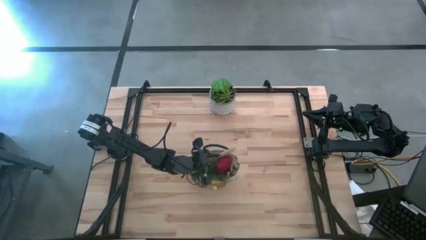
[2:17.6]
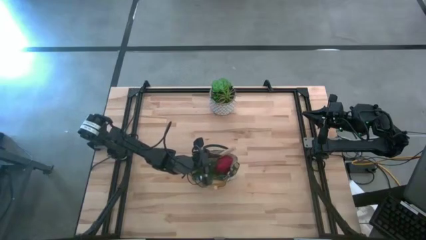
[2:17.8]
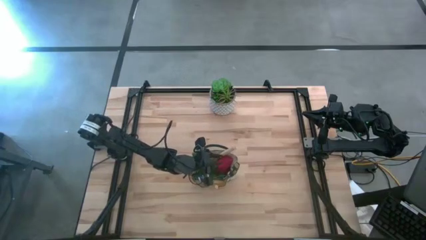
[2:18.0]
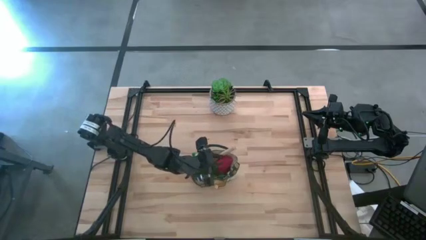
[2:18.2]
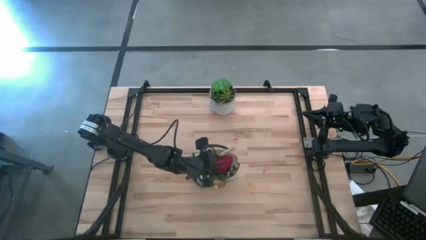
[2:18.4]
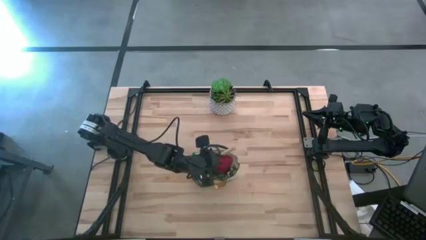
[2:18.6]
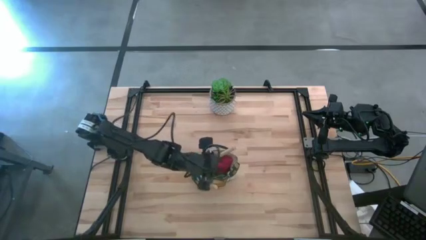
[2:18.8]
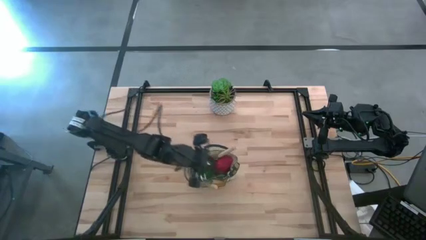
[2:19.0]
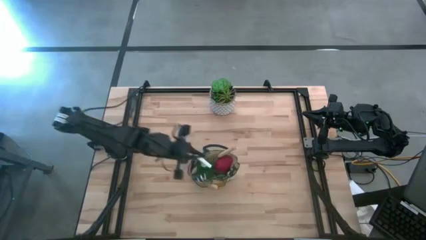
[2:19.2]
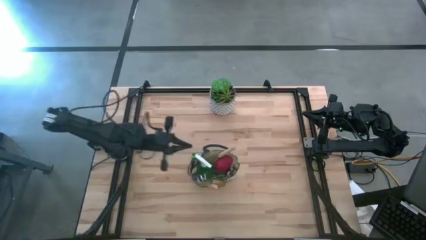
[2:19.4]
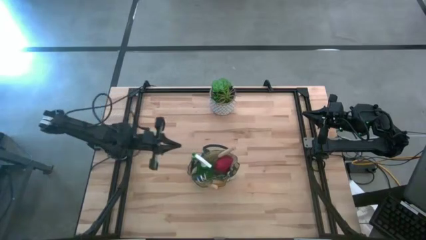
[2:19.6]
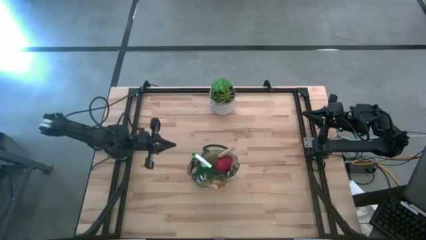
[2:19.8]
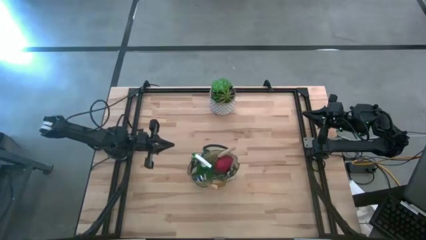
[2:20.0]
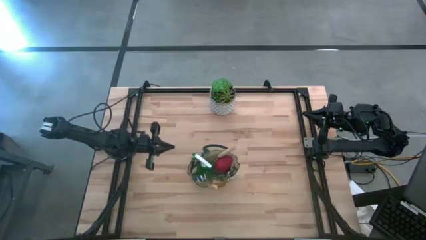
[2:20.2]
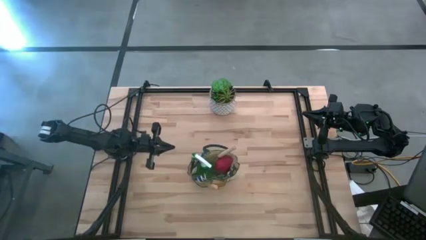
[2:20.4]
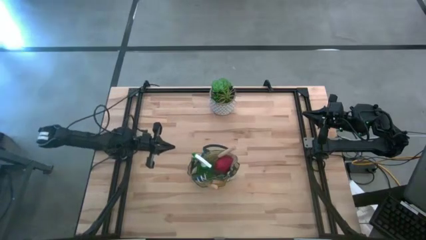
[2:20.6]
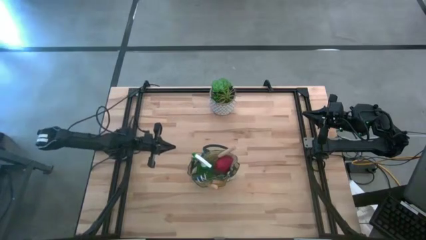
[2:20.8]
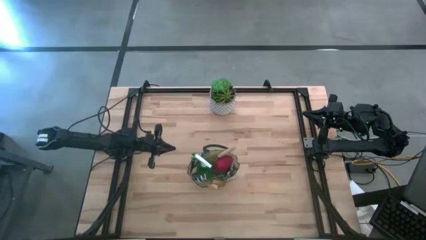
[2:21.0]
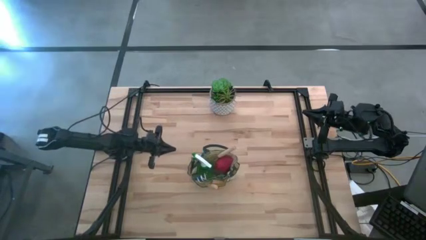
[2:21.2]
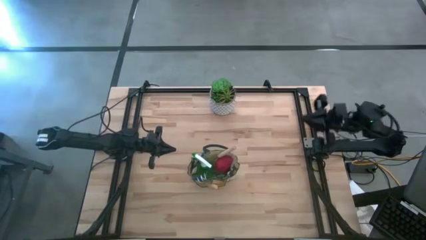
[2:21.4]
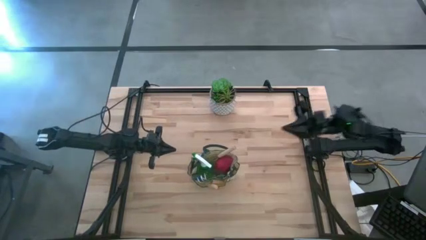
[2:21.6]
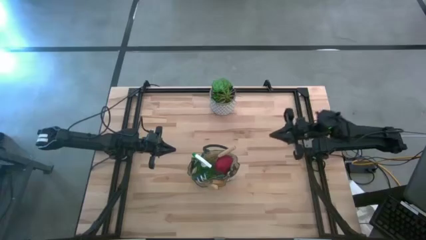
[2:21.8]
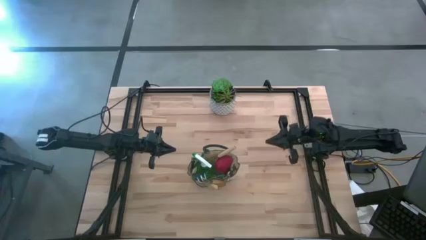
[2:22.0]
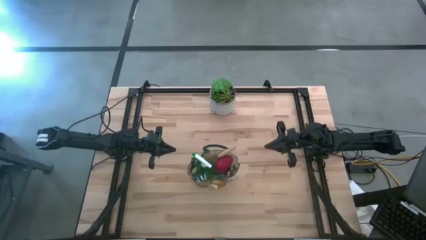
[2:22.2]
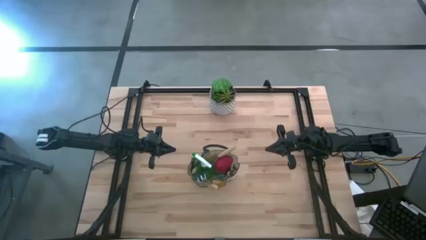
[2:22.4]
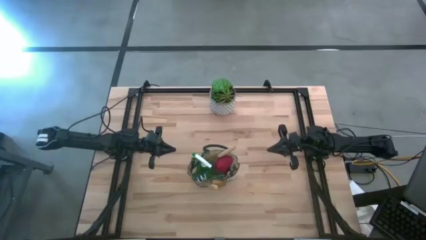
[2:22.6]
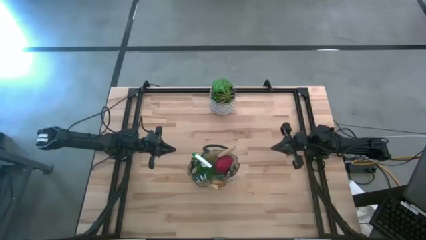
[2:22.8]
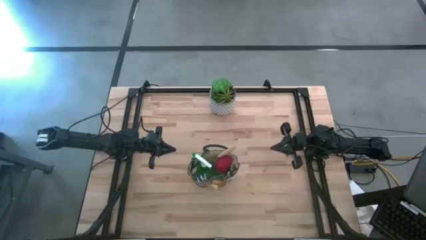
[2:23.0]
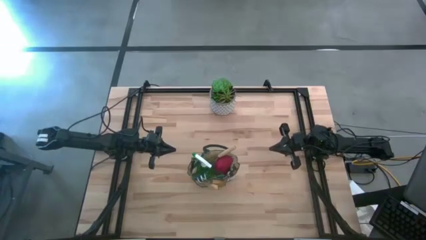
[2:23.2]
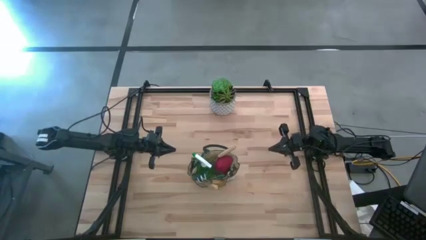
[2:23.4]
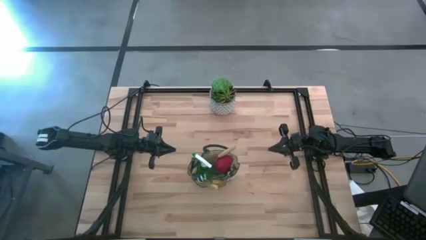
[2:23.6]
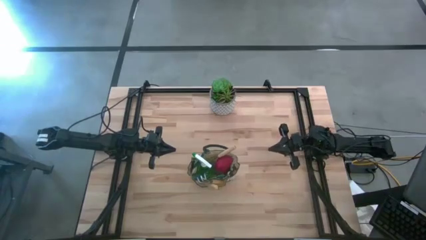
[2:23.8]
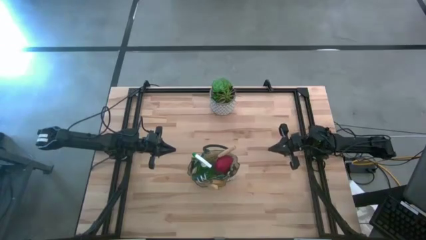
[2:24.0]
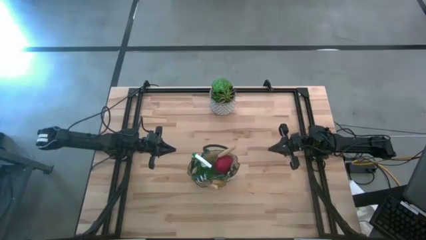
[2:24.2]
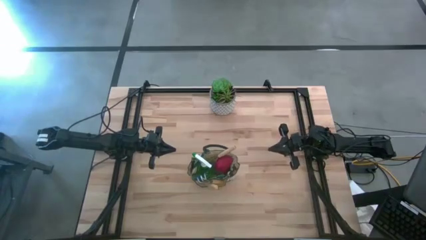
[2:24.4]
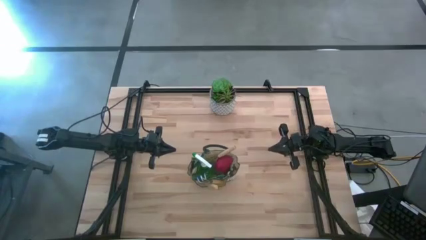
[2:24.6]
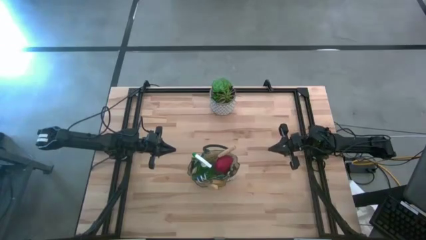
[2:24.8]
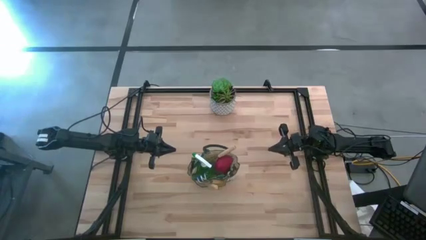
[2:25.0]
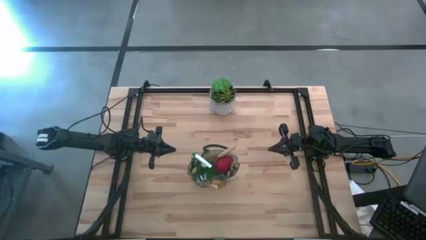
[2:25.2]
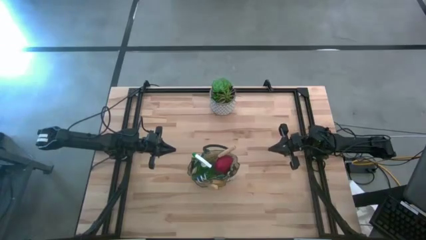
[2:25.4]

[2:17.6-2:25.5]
Task: Pick & Place Garden tools in Gardening bag
Return to Home Position

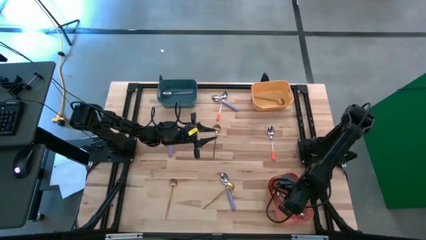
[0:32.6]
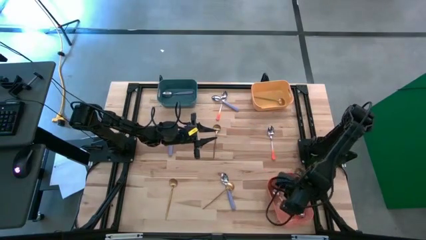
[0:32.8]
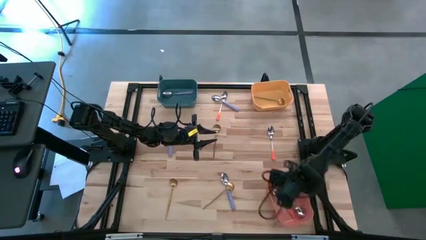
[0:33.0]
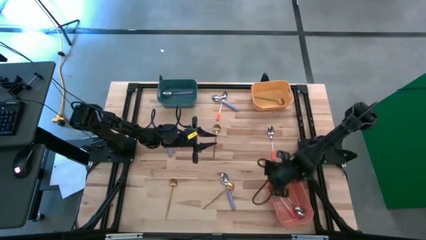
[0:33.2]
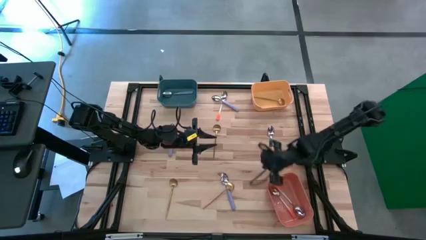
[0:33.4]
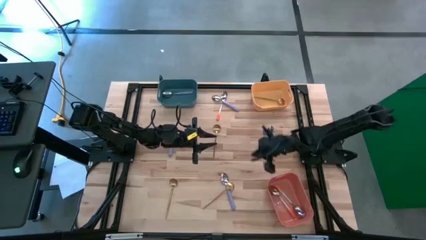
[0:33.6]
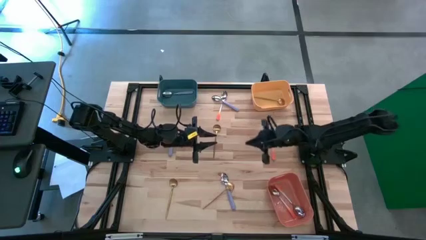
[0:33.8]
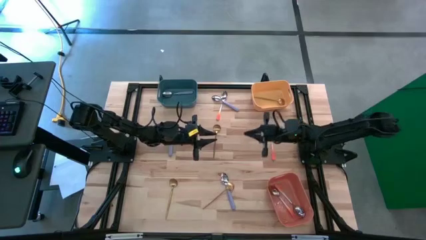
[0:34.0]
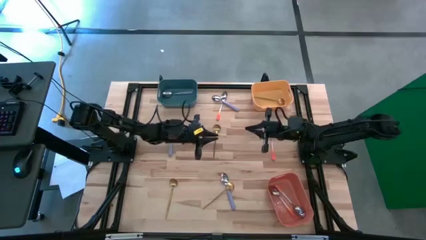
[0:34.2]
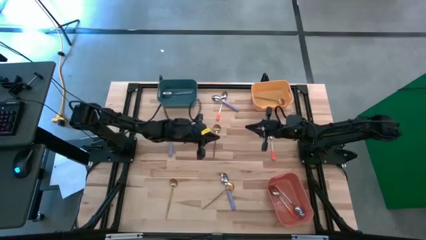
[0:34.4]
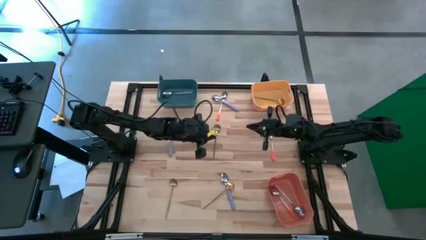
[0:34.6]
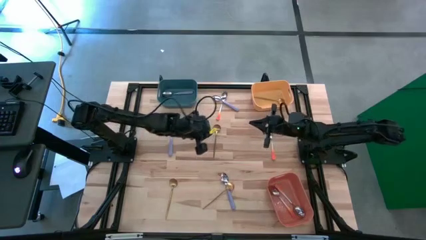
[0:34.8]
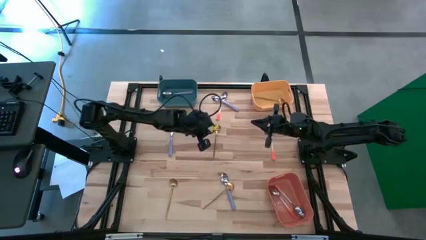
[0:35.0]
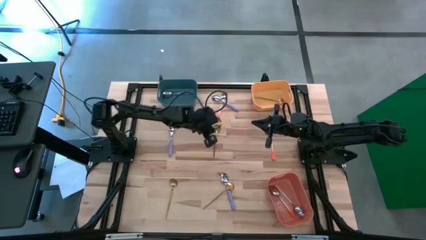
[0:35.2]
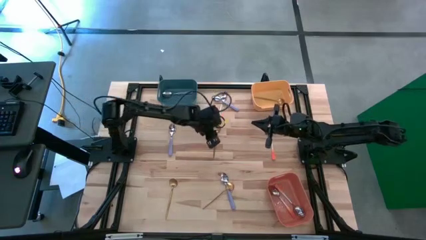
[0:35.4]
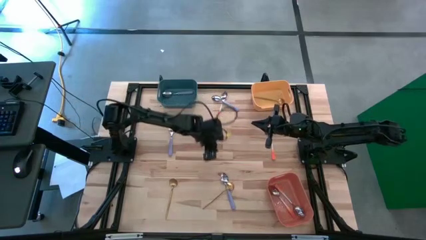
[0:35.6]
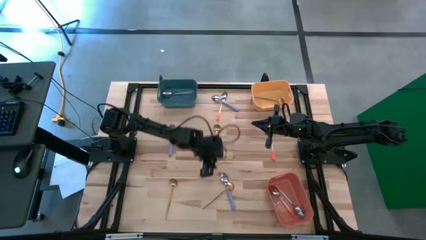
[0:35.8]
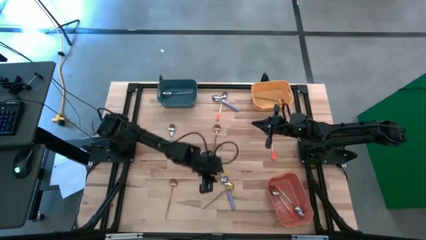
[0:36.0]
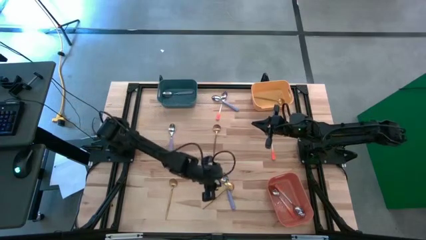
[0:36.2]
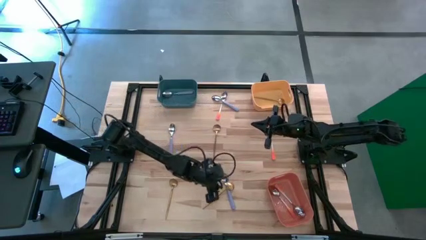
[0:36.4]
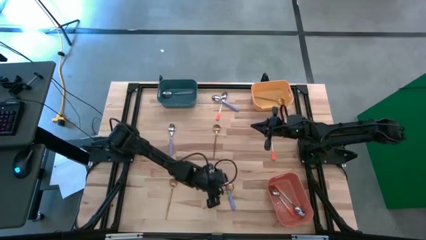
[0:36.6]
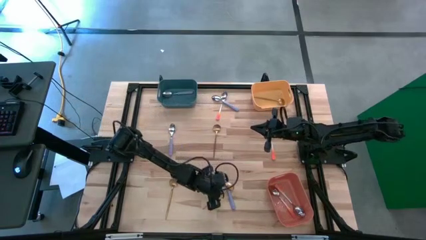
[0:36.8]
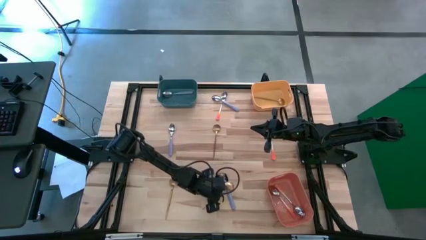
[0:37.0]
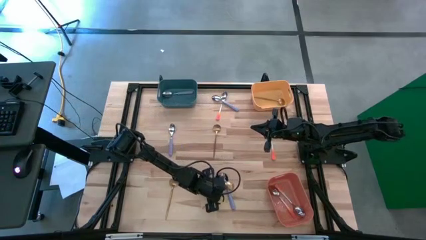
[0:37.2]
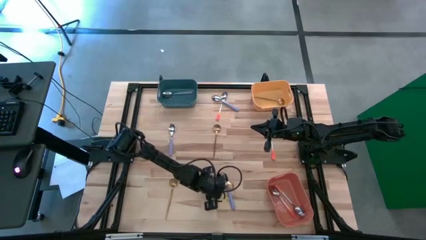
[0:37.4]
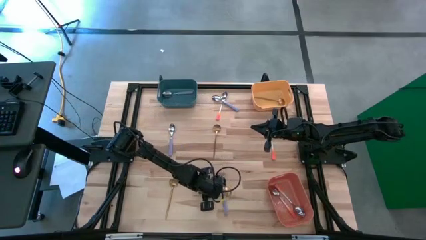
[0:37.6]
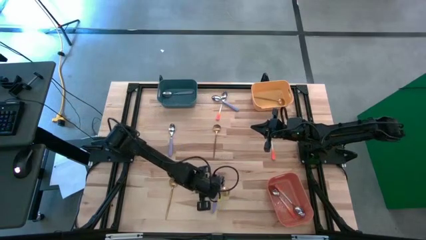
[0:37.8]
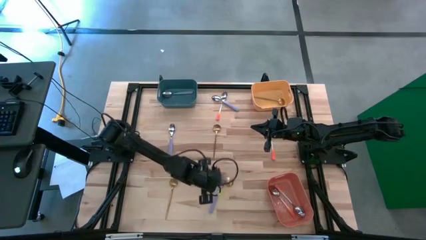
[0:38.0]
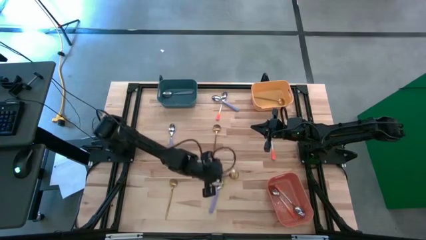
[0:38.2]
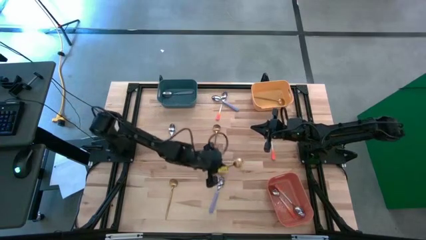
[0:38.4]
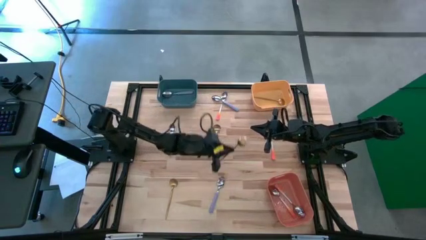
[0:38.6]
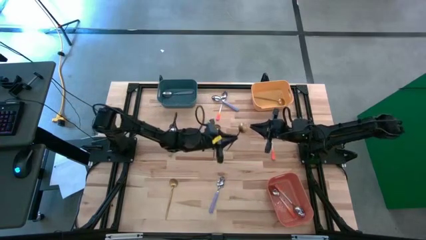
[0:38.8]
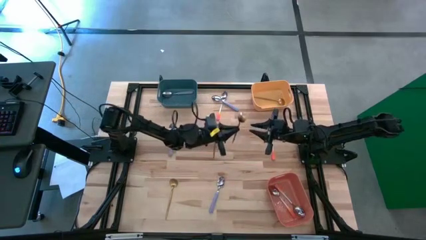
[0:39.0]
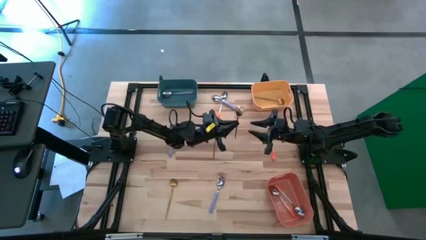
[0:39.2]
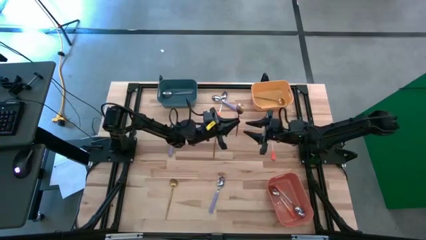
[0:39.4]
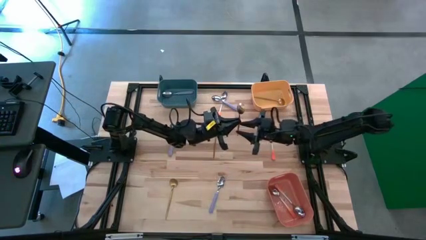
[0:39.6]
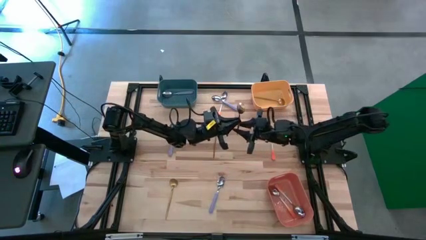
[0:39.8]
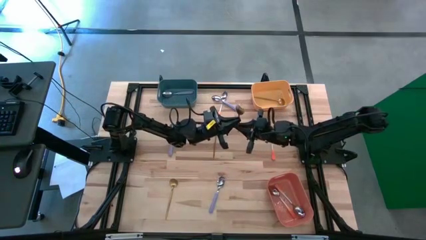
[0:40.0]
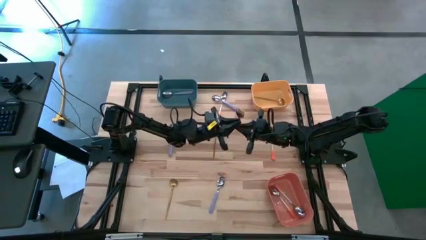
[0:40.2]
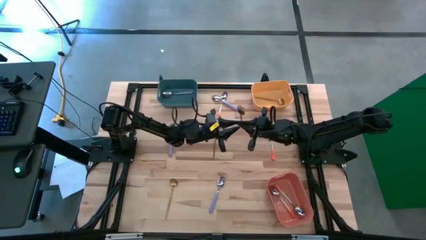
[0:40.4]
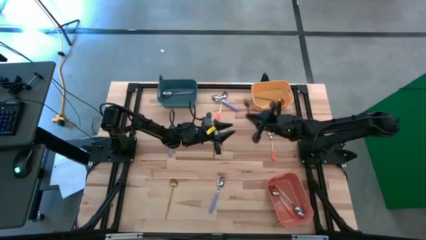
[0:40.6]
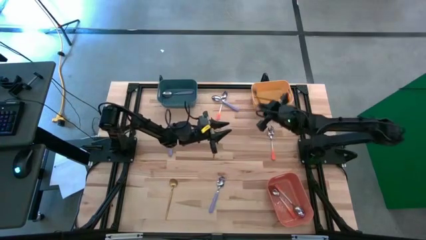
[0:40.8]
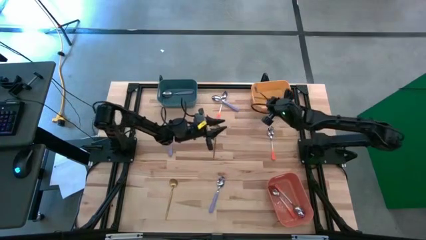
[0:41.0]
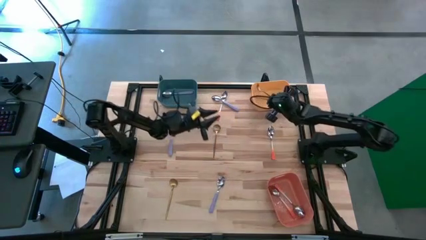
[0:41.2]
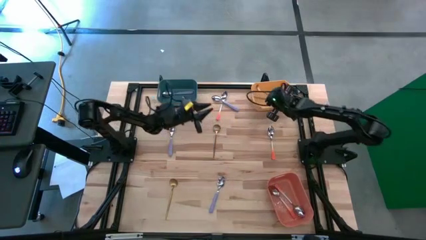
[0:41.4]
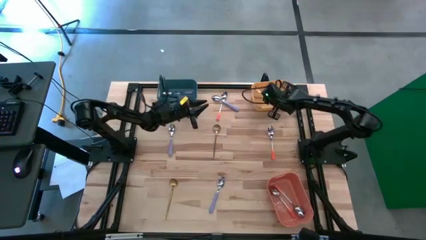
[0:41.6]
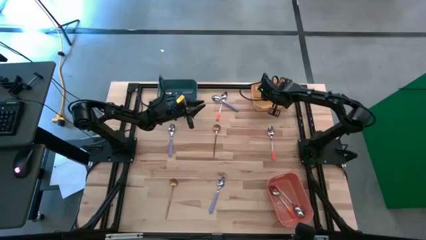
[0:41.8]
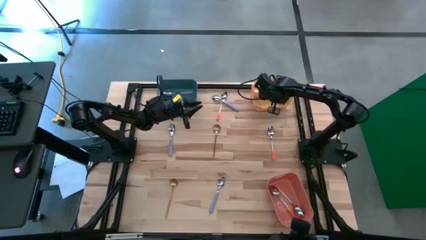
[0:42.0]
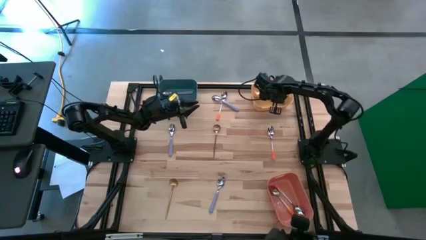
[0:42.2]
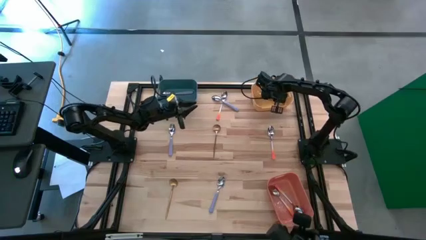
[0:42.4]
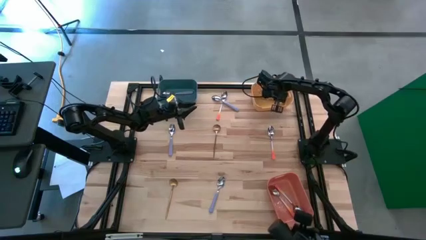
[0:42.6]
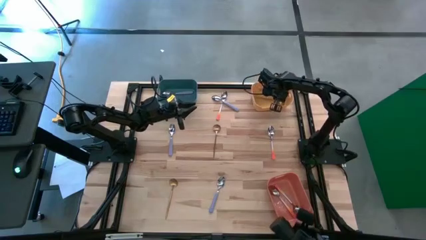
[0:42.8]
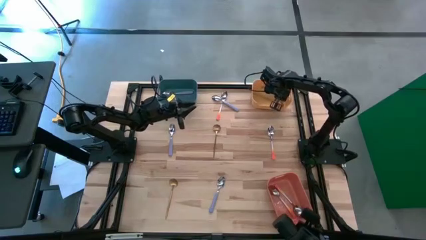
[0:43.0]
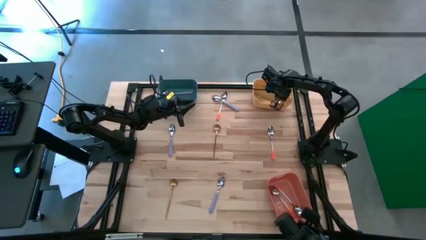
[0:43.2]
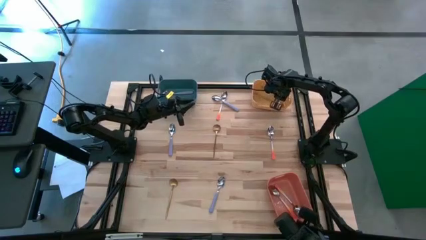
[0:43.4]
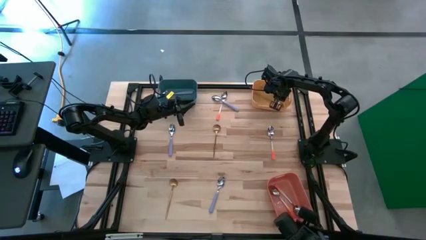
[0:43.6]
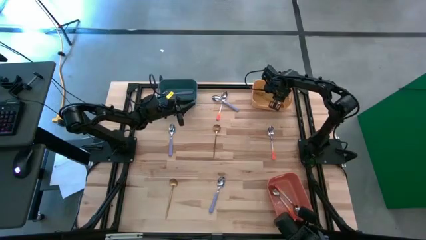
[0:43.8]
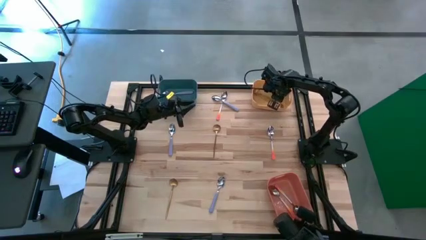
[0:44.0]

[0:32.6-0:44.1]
Task: Sort silverware by color (type)
Put the bottom right gold spoon into the yellow bin
